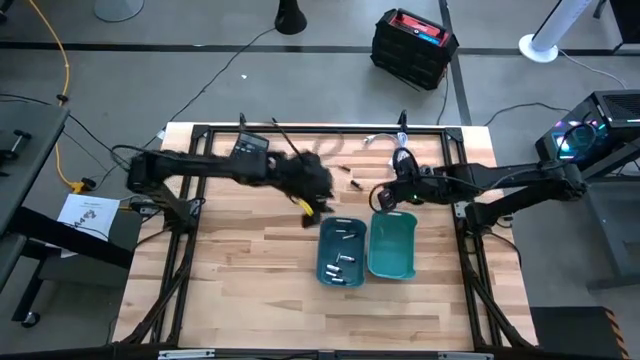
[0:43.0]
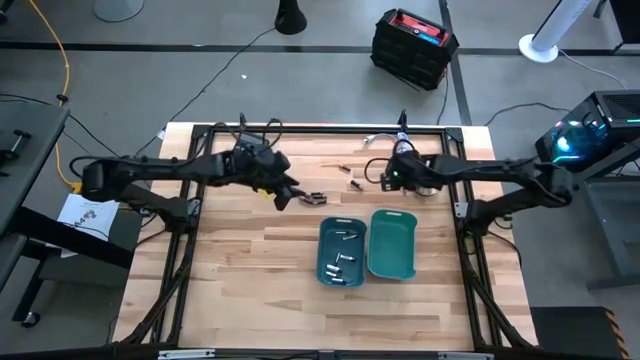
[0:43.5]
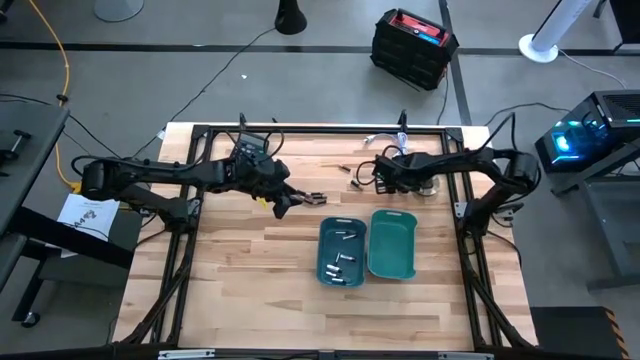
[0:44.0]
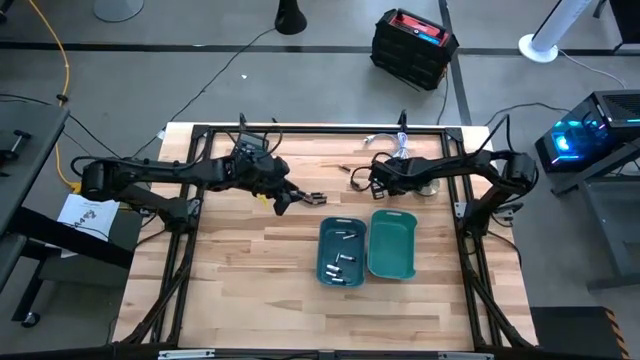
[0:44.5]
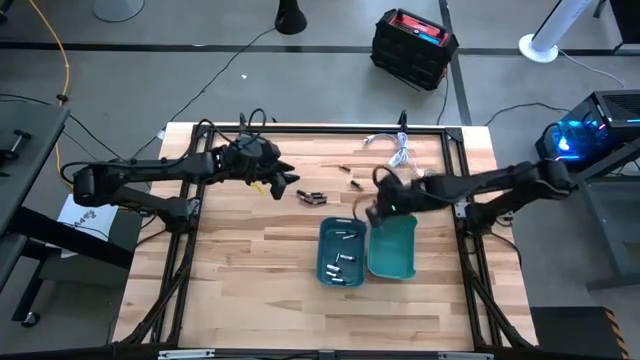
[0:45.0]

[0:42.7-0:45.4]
Task: Sort batteries
Put the black battery into the green bin

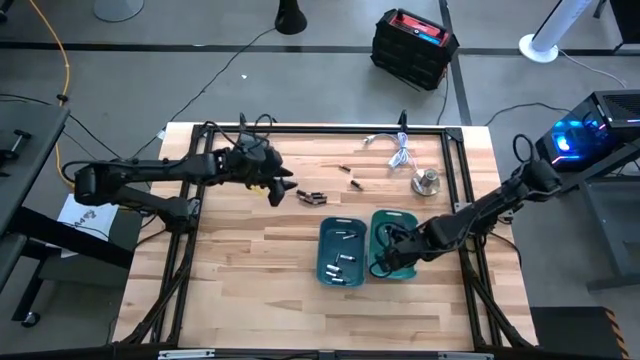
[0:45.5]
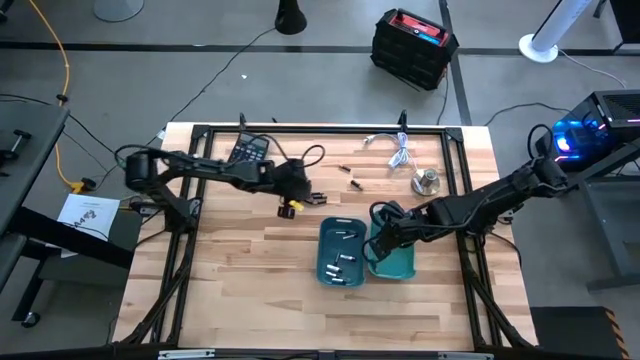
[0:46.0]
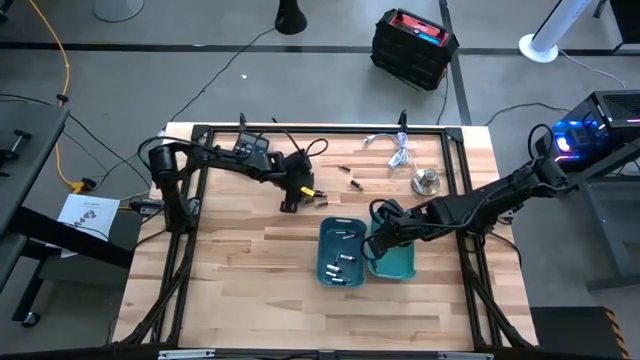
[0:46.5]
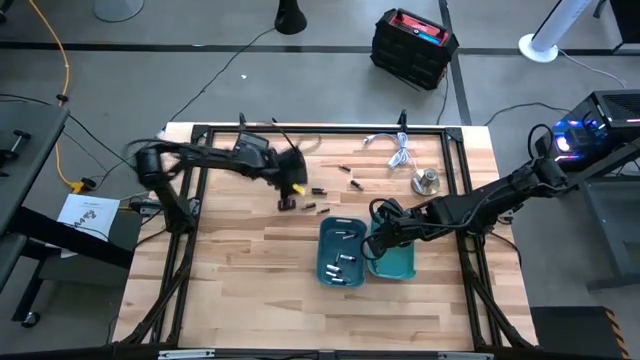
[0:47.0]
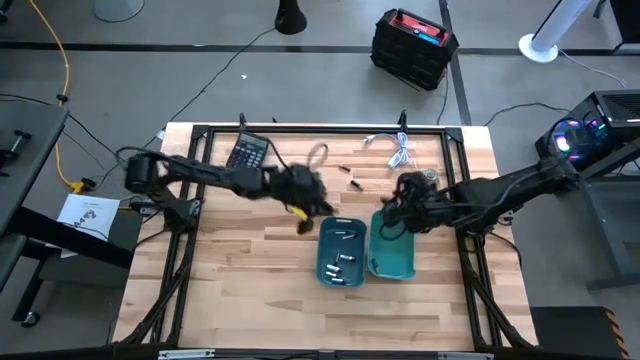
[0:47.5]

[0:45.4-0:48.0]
Put the black battery into the green bin

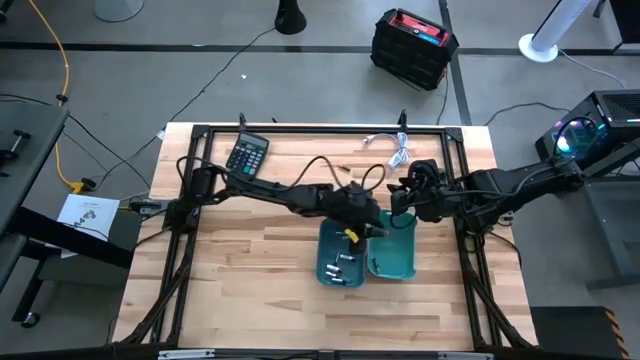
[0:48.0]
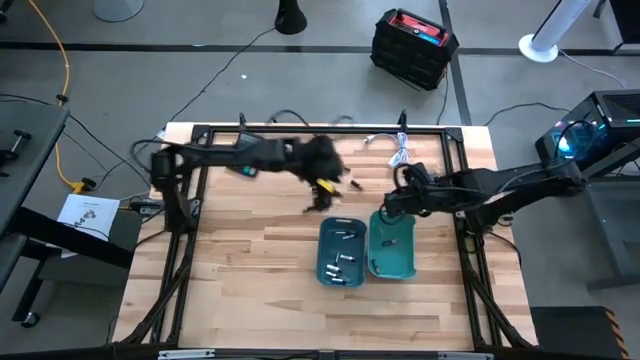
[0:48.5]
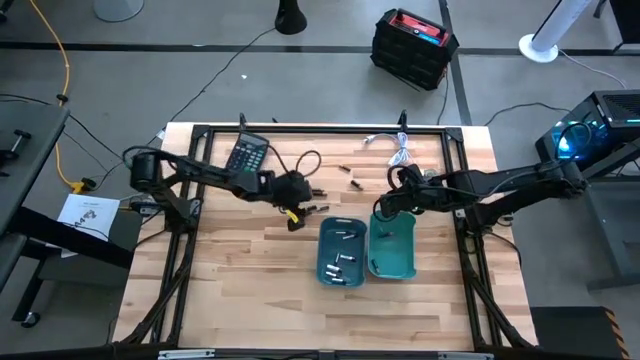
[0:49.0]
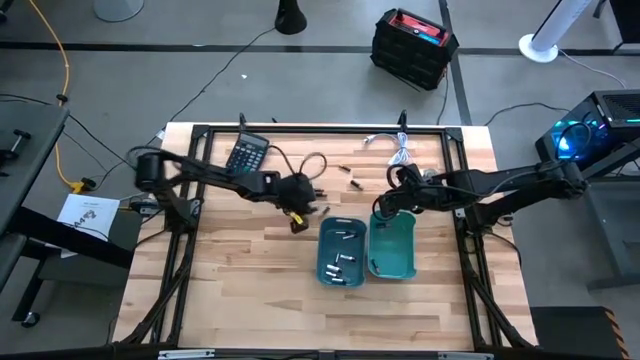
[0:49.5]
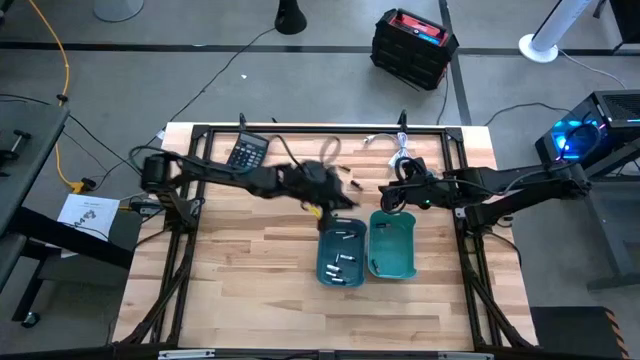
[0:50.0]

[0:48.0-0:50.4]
Put the black battery into the green bin

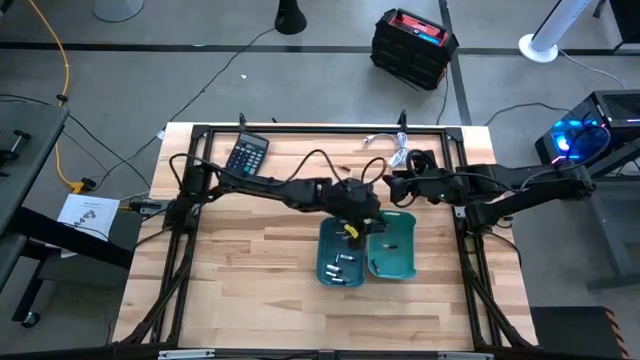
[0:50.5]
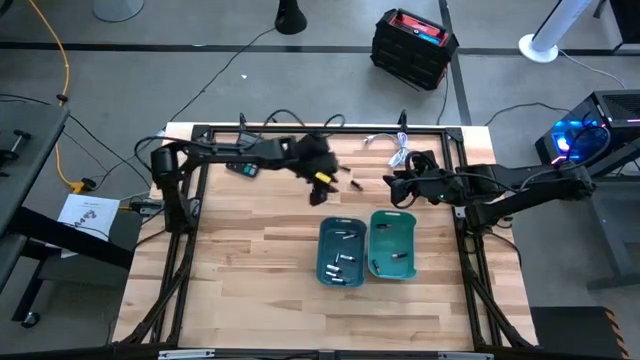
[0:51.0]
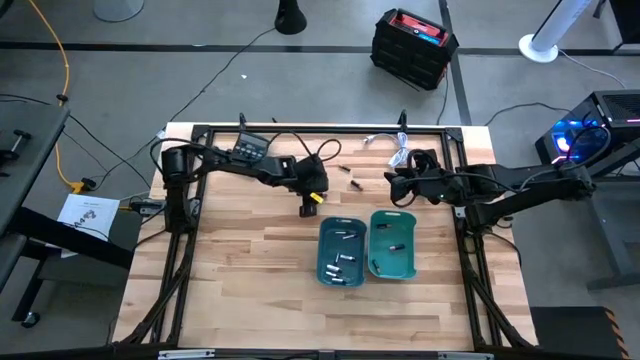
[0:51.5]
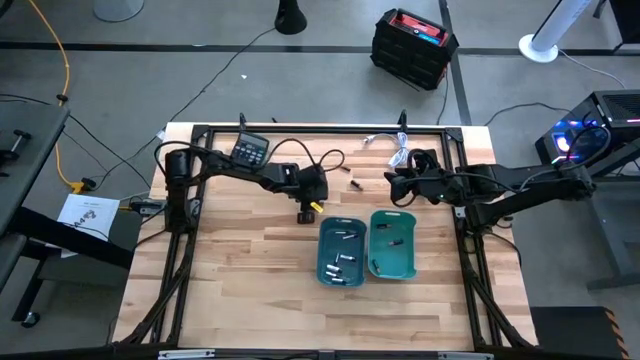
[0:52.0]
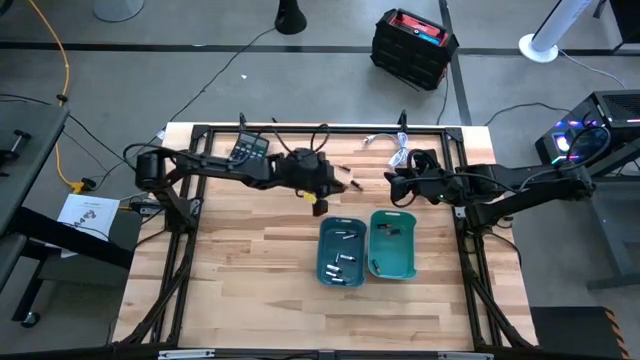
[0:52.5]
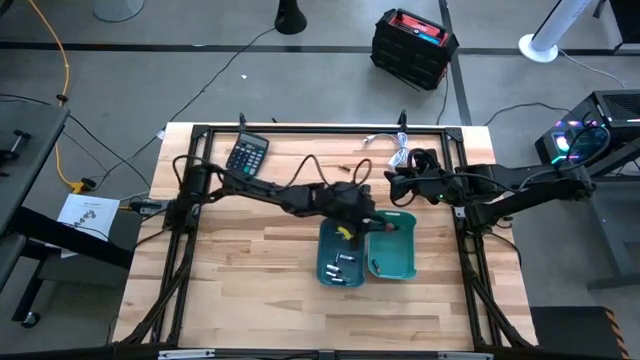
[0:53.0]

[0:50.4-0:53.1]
Put the black battery into the green bin

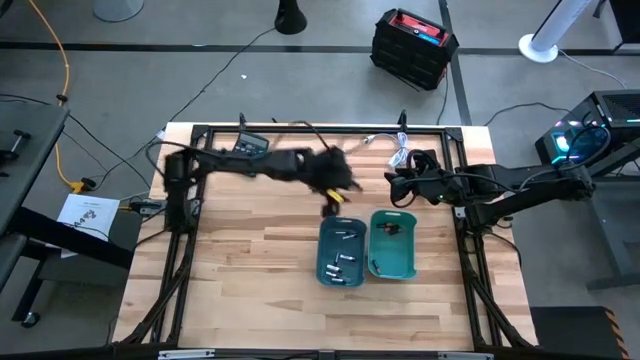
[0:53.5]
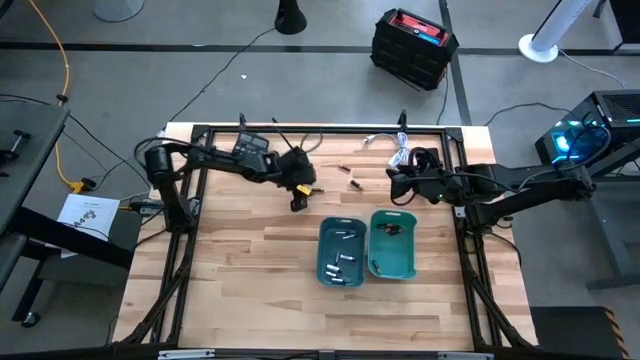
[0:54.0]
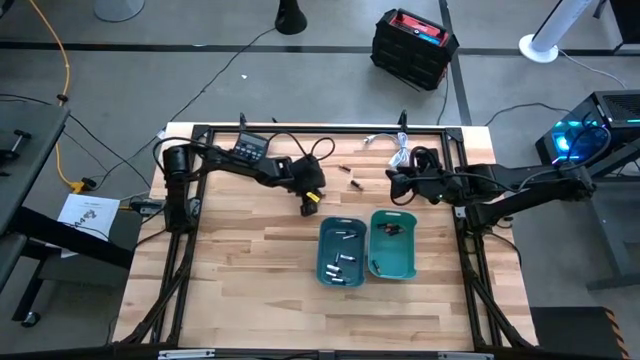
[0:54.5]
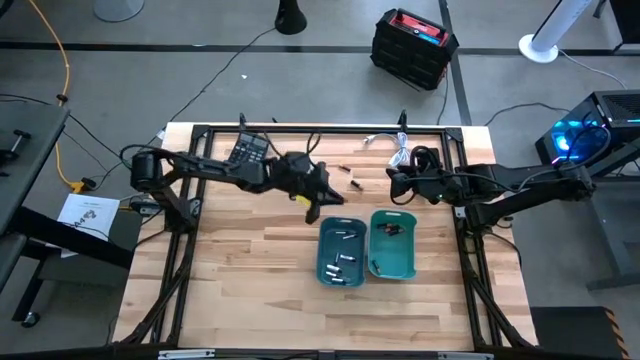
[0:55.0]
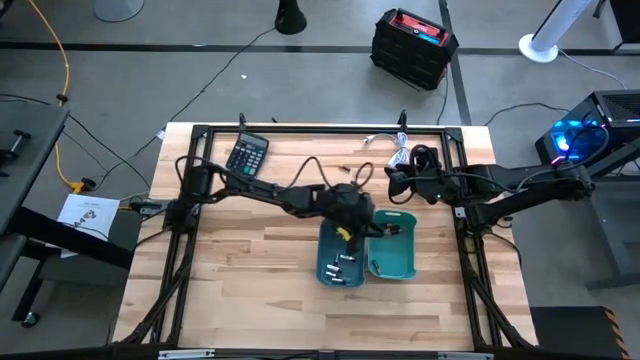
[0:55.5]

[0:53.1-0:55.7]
Put the black battery into the green bin

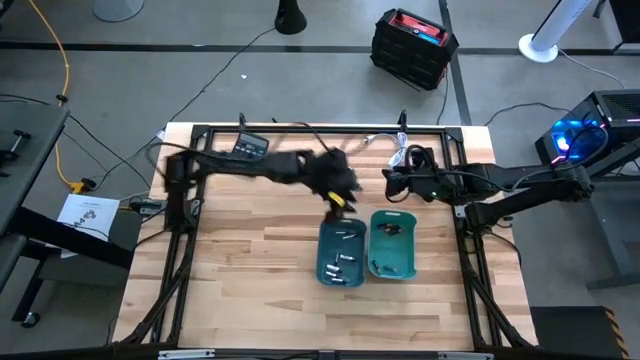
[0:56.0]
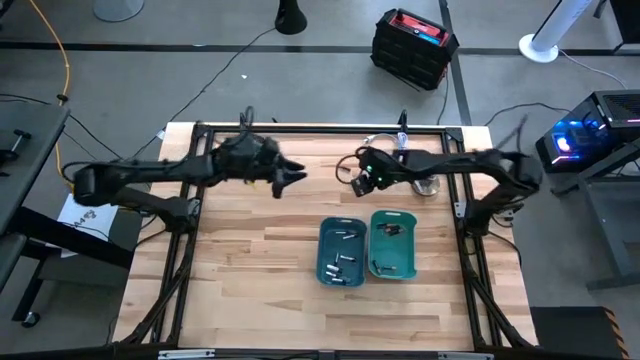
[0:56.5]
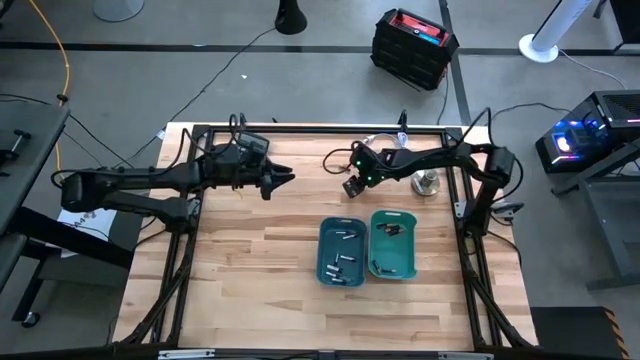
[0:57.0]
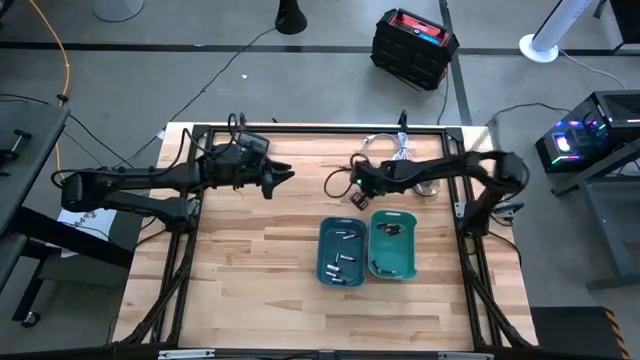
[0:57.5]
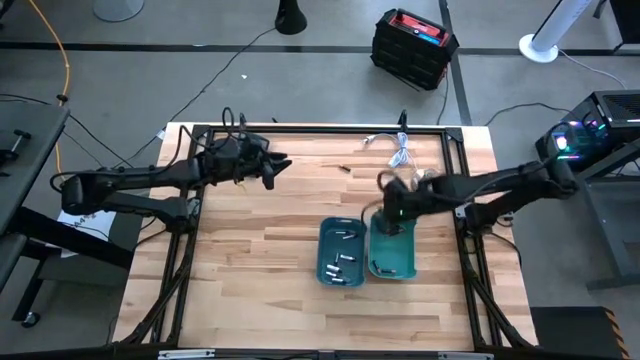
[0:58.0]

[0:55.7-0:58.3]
Put the black battery into the green bin

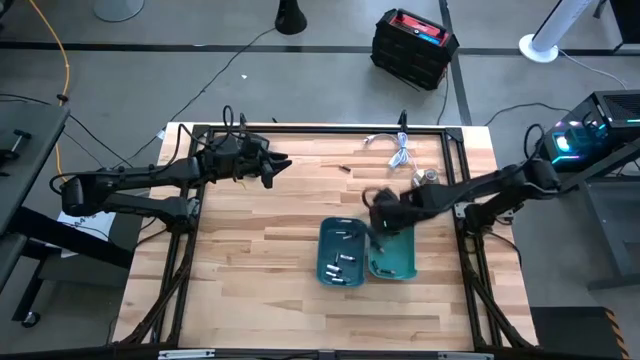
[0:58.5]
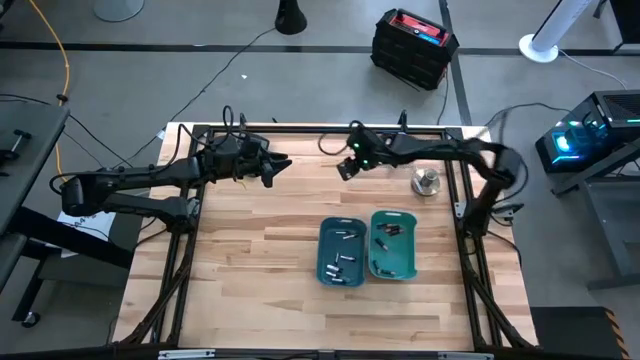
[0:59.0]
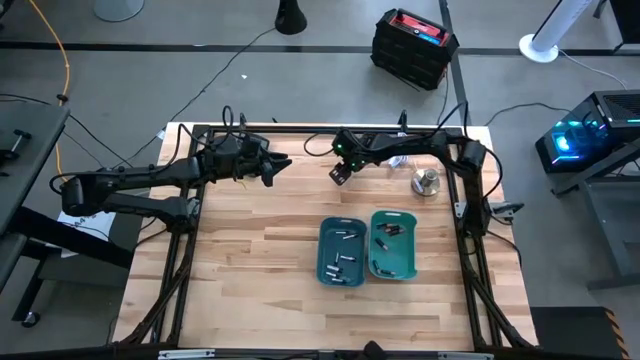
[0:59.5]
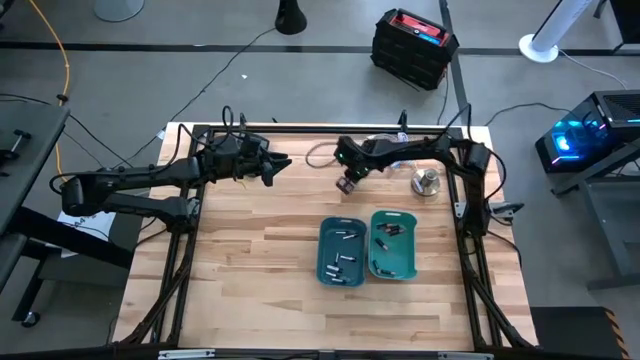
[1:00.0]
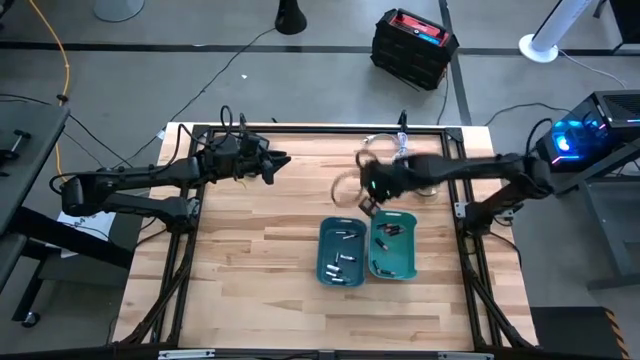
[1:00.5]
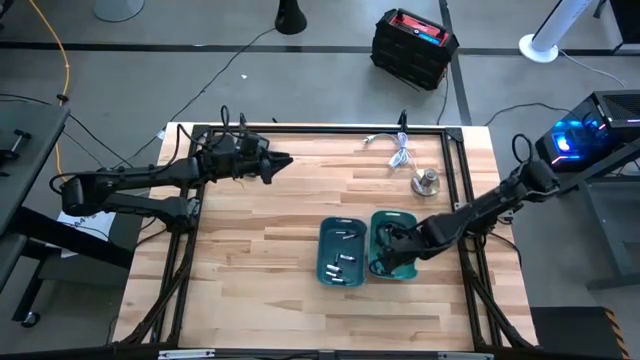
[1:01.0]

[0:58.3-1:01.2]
Put the black battery into the green bin

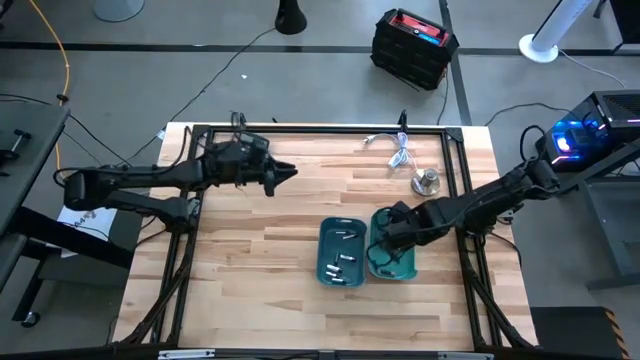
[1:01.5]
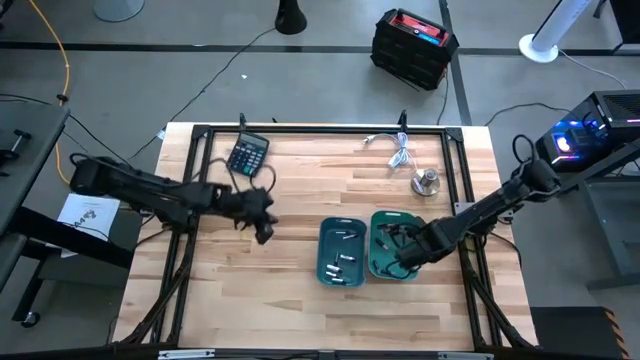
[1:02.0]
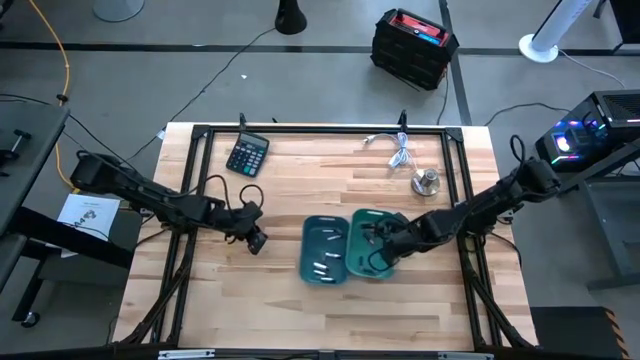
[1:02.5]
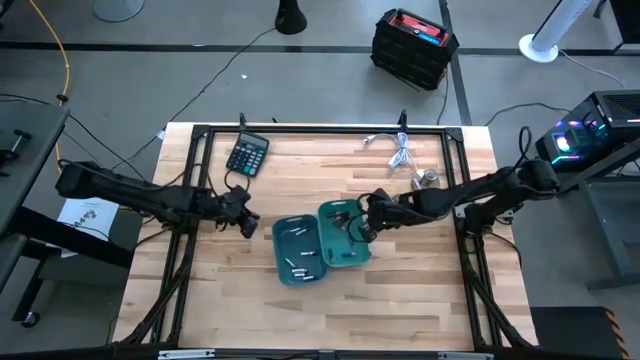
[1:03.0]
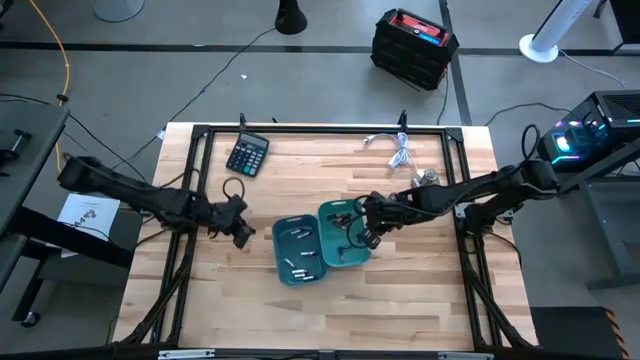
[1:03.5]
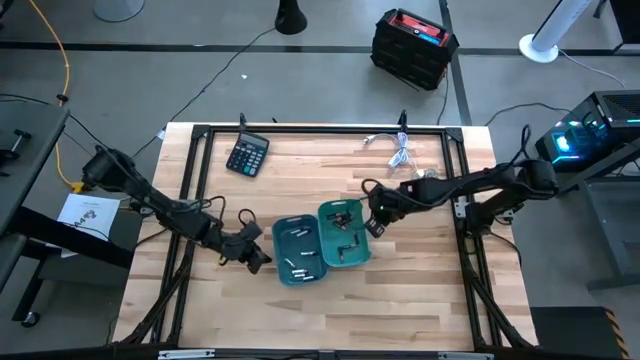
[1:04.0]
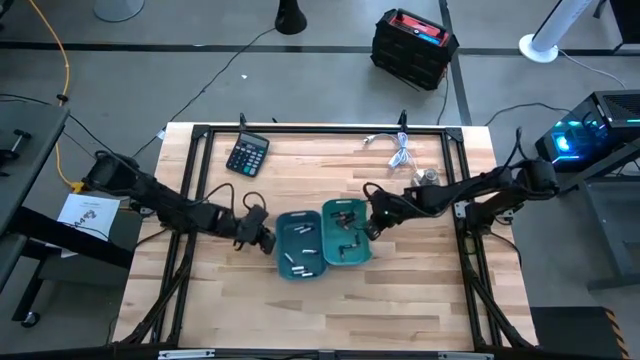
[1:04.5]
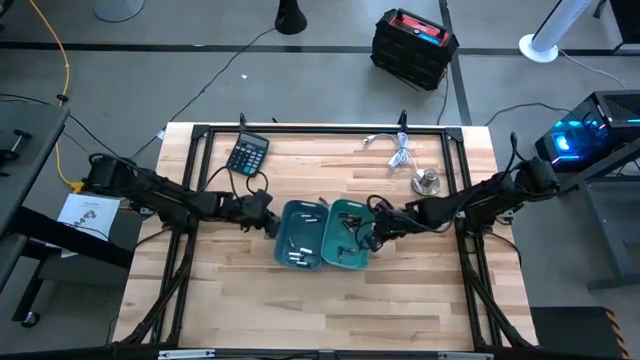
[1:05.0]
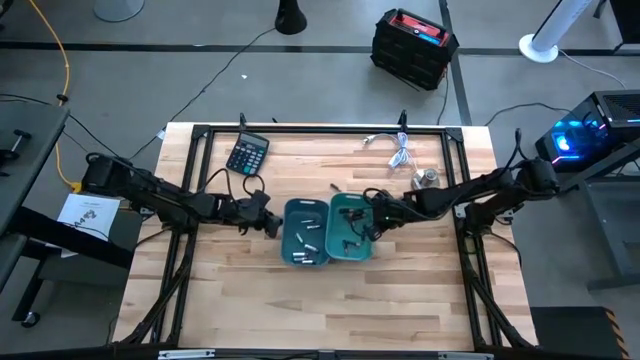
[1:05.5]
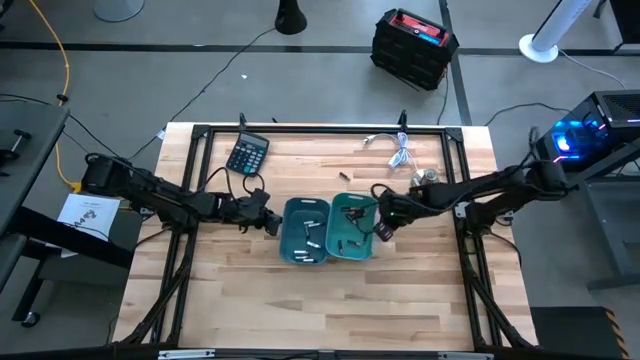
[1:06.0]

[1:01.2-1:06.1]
Adjust the bins to the center of the table
